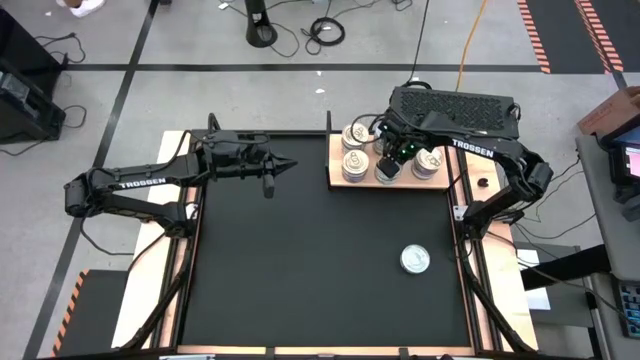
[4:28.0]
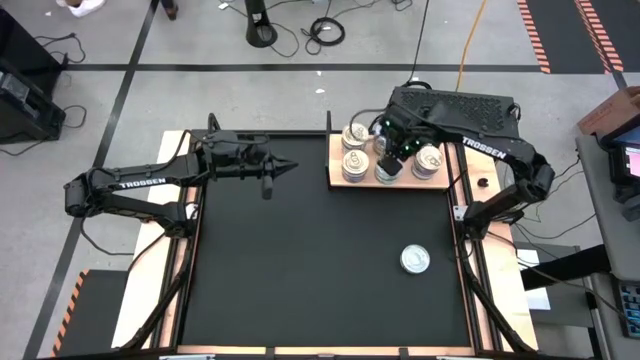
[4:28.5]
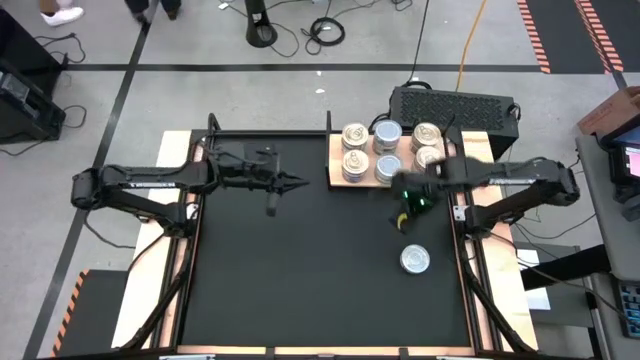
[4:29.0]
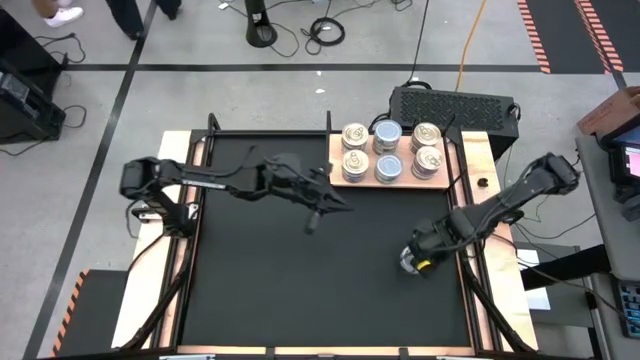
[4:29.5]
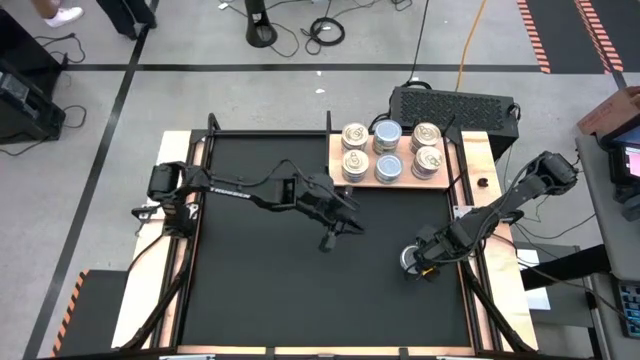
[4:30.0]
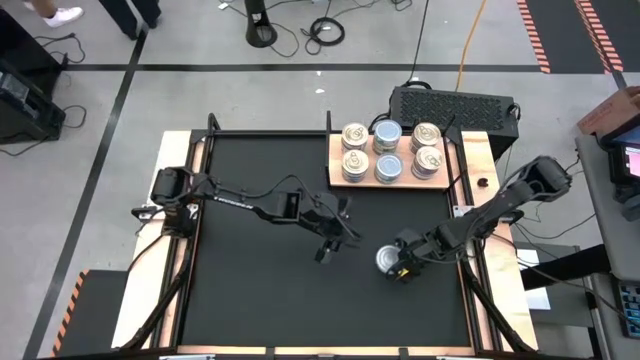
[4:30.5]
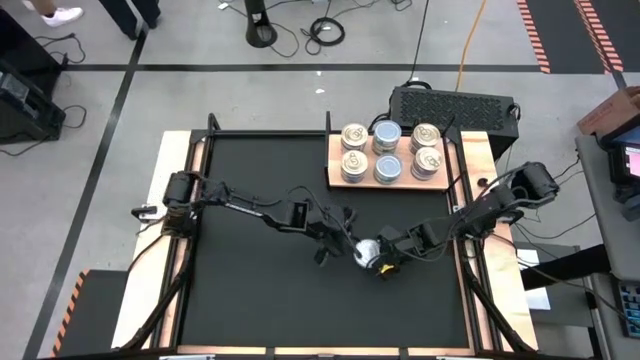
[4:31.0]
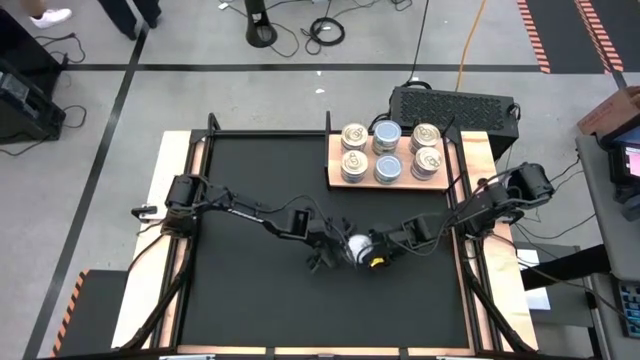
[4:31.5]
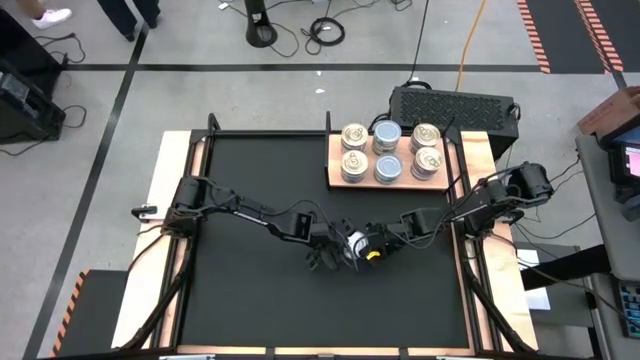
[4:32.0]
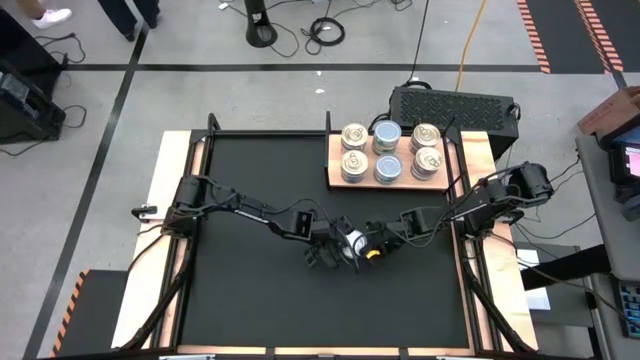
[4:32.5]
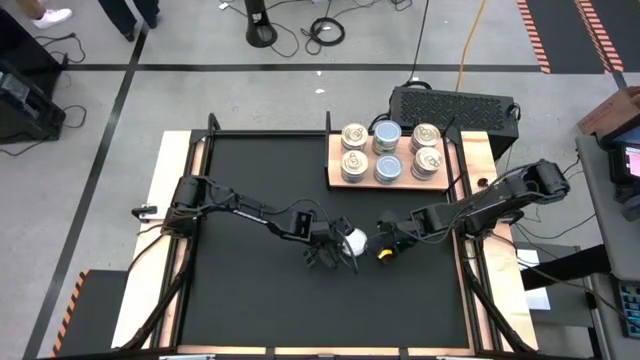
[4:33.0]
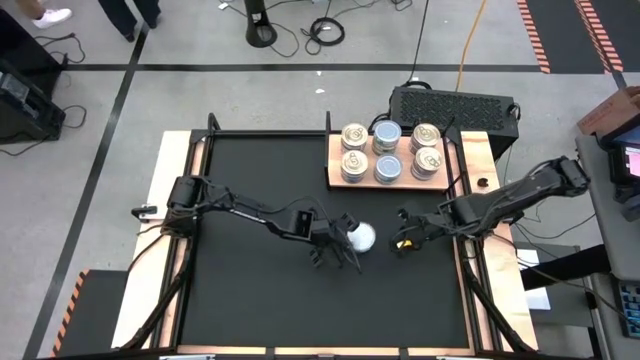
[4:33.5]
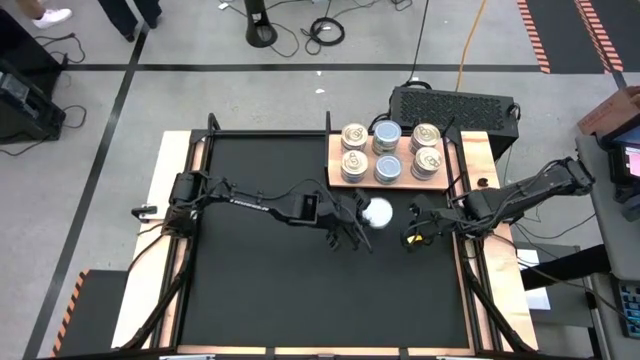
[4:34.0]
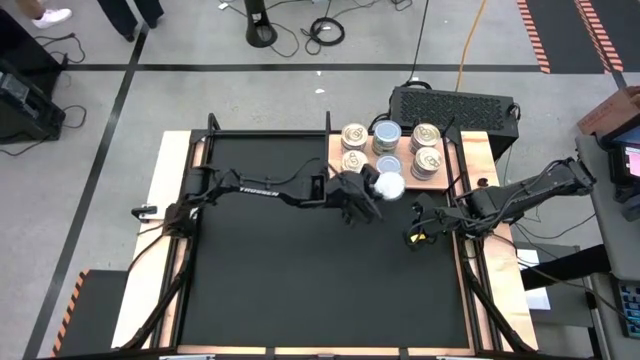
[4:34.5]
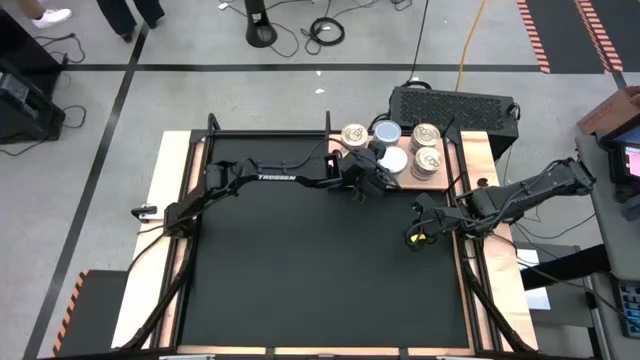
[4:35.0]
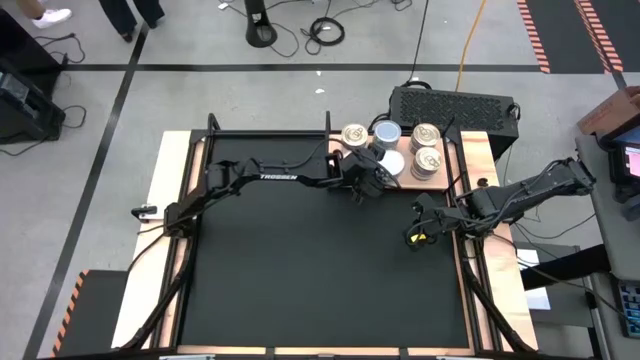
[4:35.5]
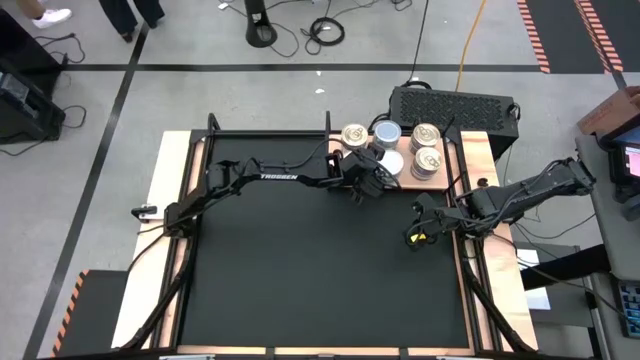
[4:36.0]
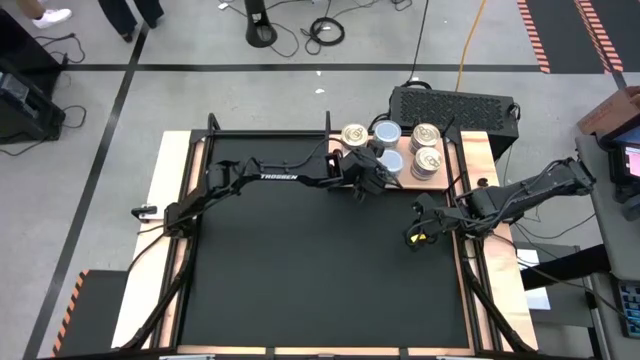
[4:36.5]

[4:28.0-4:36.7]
Task: Stack canned seafood by type on shelf
Stack the green tuna can on top of the other green tuna can on the shelf

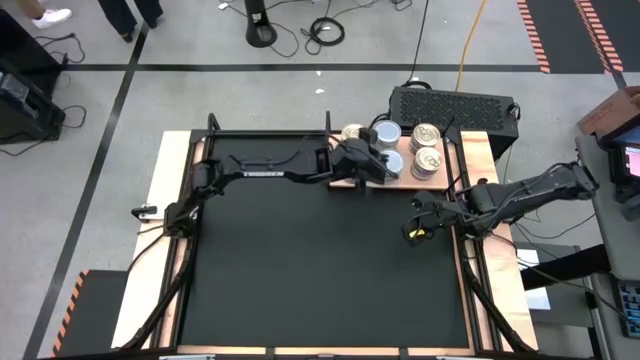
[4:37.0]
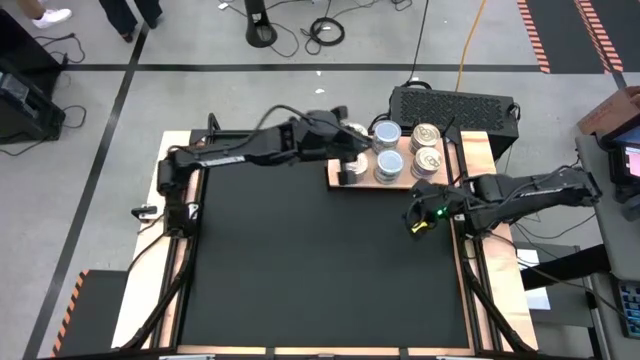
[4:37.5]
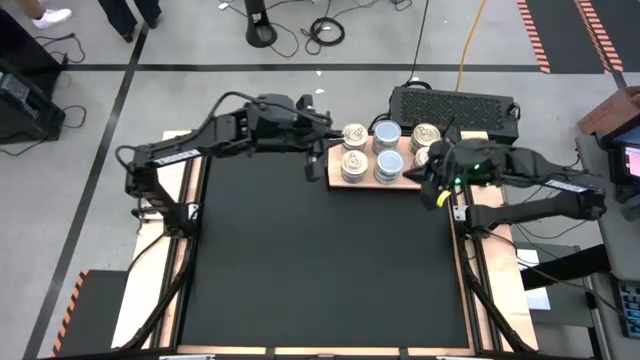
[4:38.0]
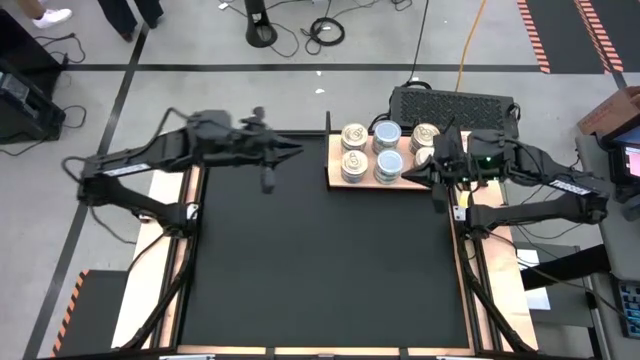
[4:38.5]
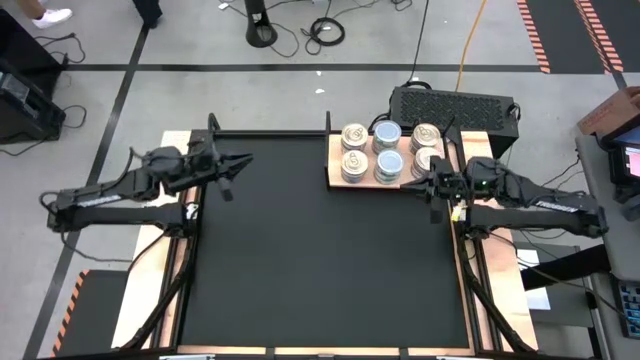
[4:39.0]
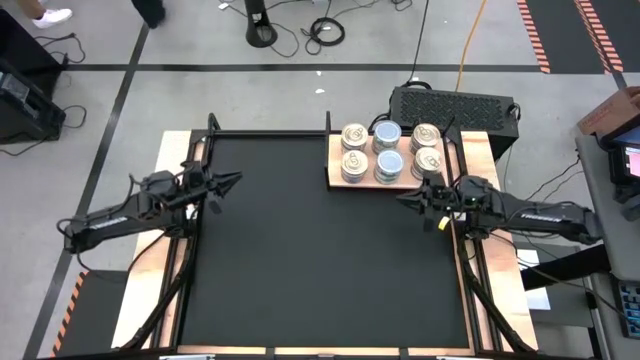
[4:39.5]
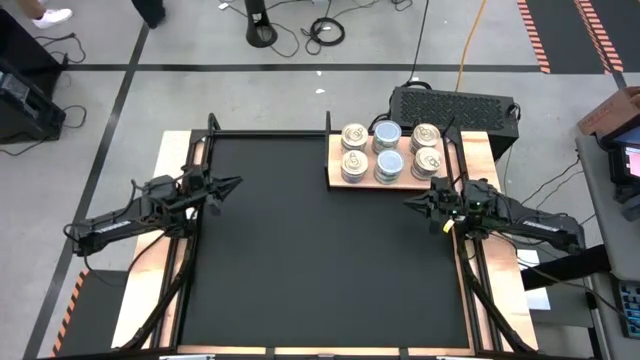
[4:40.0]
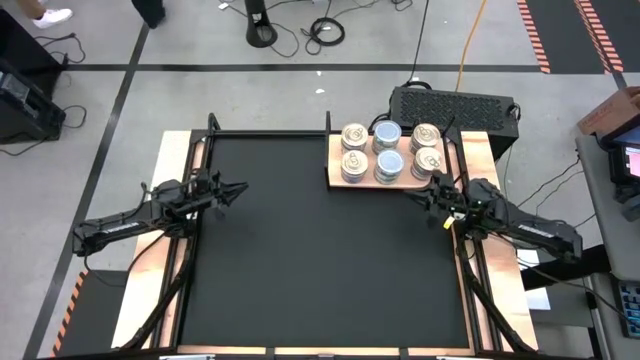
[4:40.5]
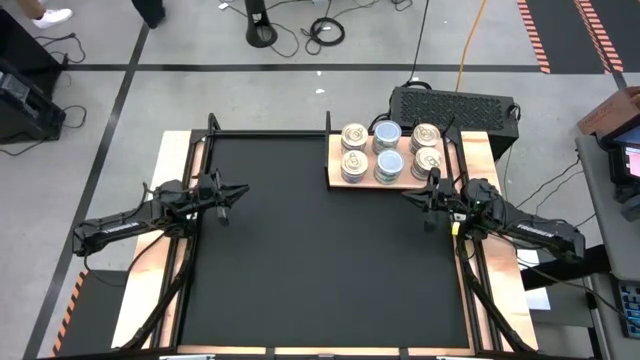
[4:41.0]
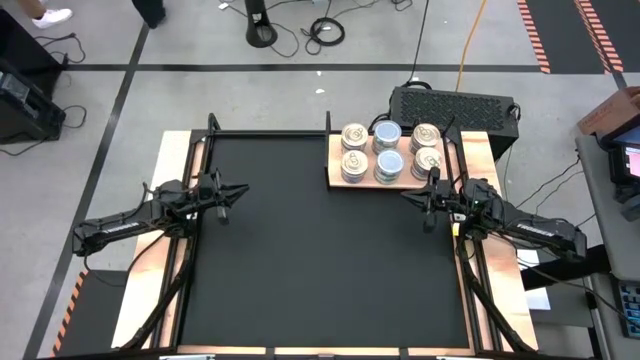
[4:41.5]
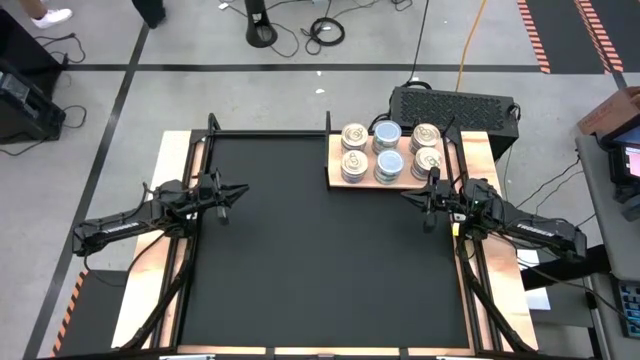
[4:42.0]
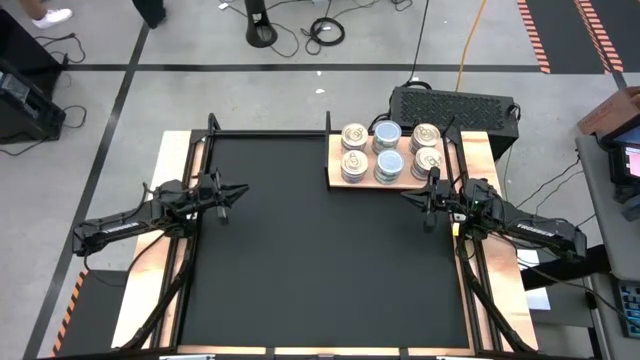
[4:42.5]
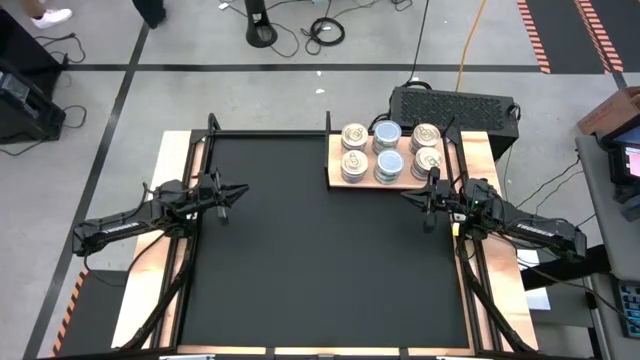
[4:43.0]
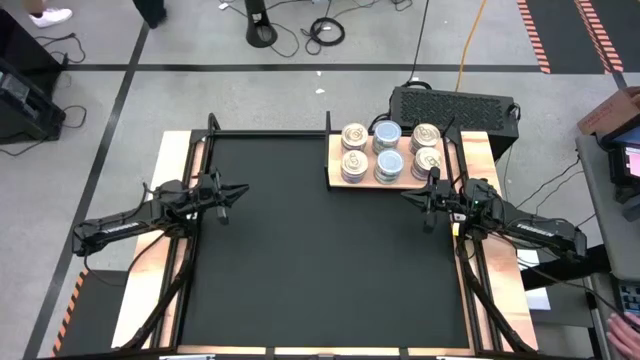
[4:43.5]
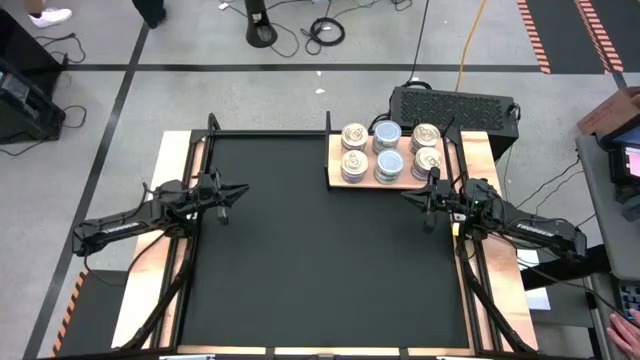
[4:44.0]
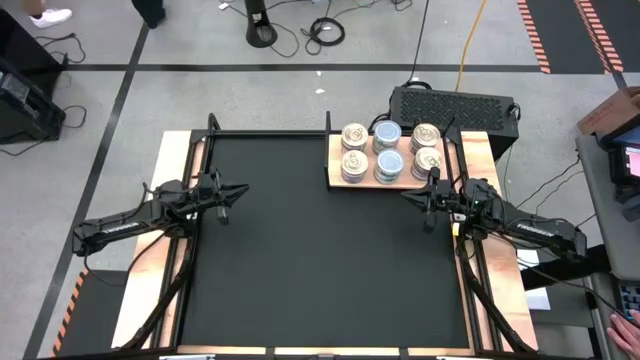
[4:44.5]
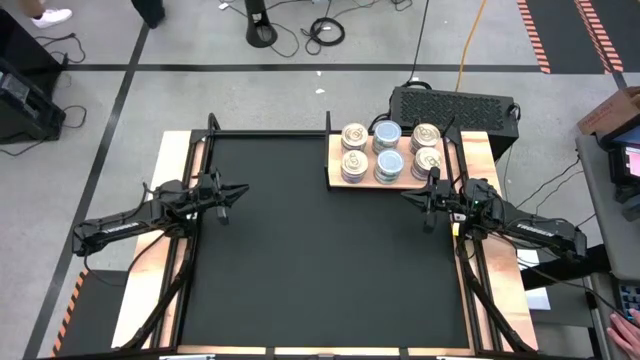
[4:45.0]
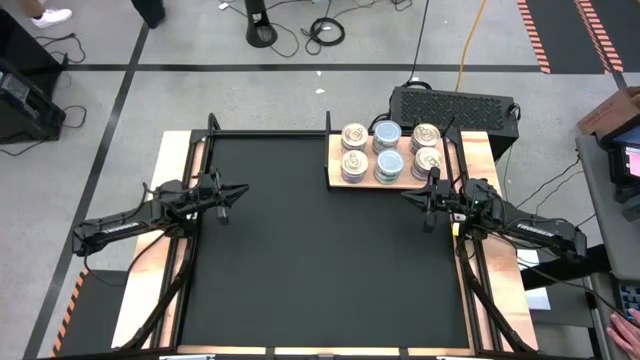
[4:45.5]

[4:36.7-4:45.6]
Return to Home Position

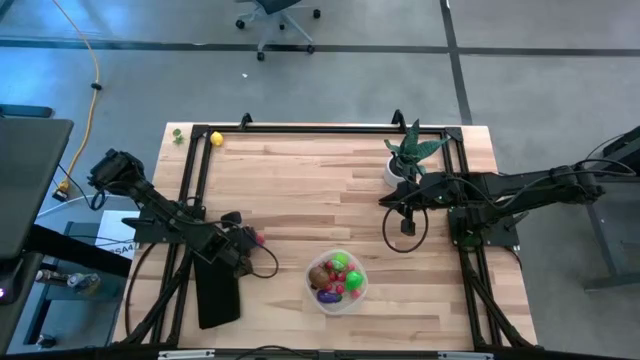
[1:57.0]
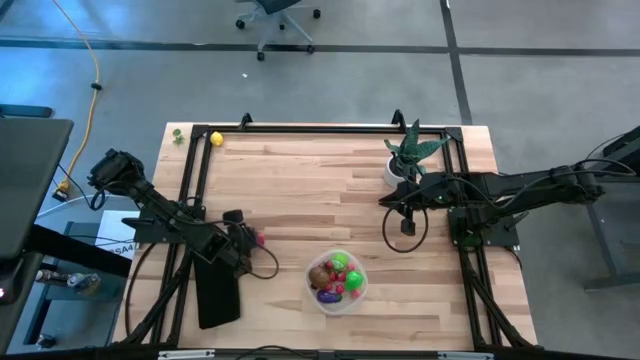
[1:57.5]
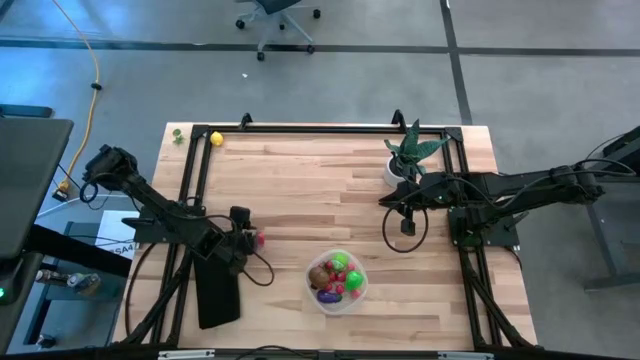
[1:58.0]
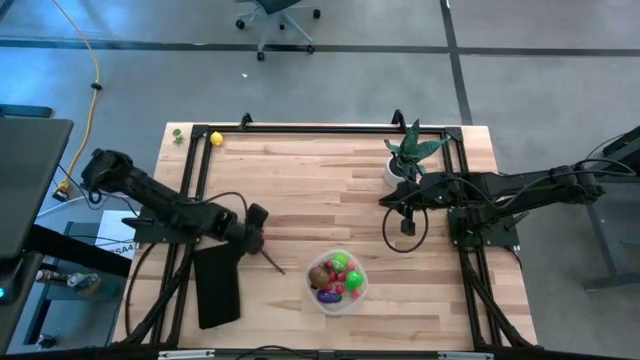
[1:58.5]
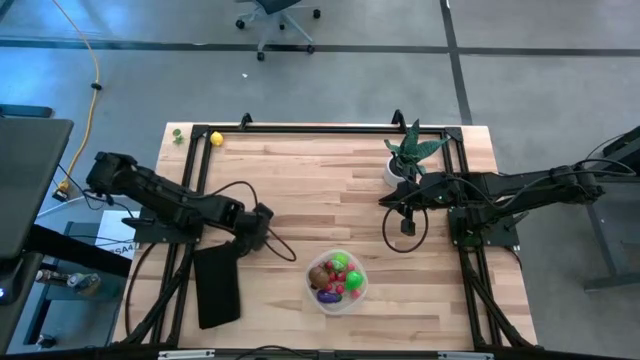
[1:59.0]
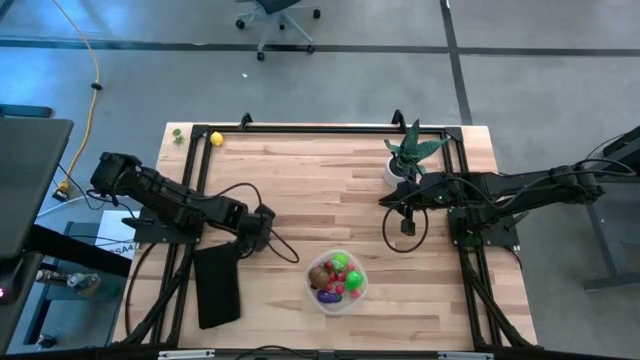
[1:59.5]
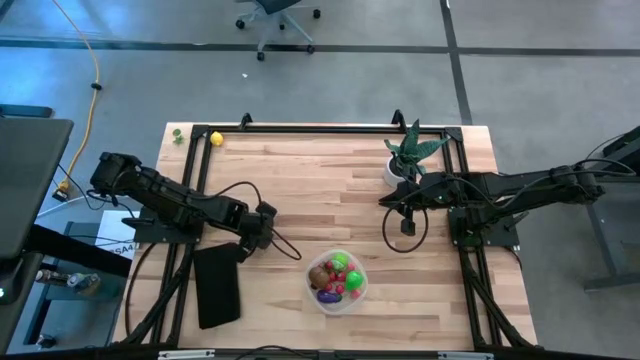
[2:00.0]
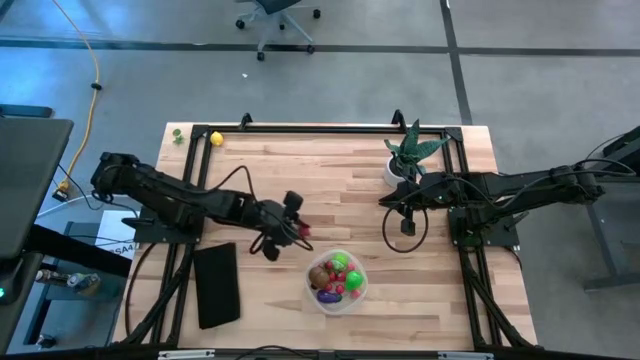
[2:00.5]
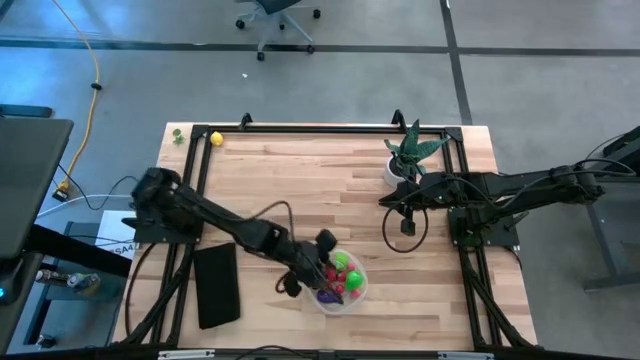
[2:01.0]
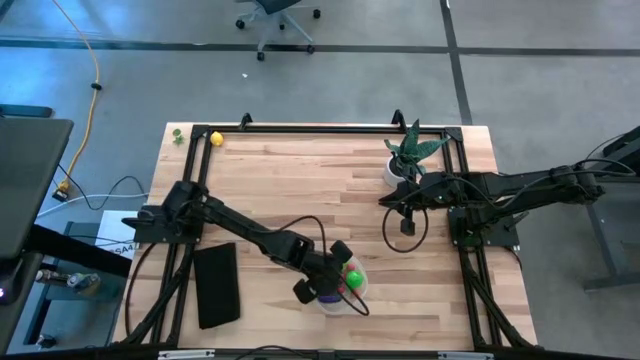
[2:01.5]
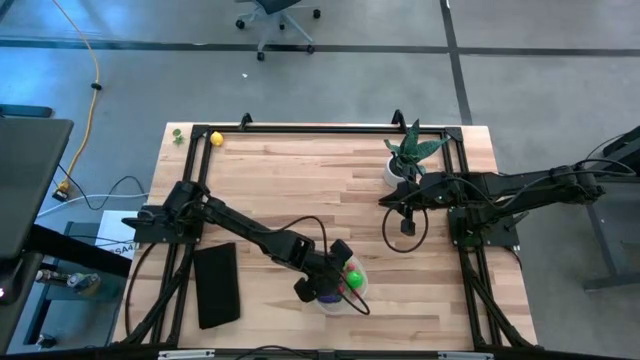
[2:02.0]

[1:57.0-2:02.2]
Task: Pick and placing Produce into tupperware
Put the red strawberry into the transparent container
